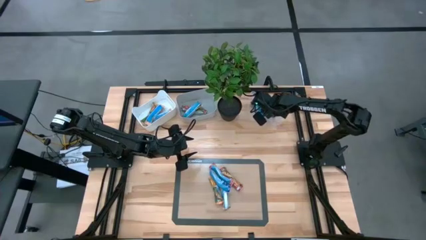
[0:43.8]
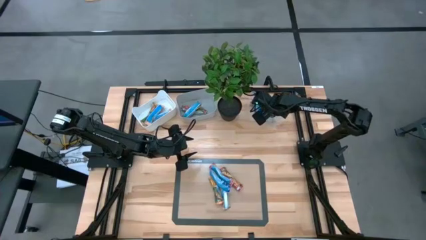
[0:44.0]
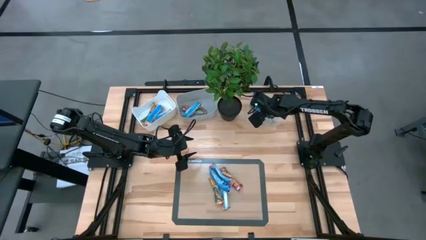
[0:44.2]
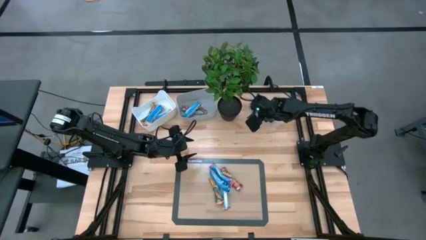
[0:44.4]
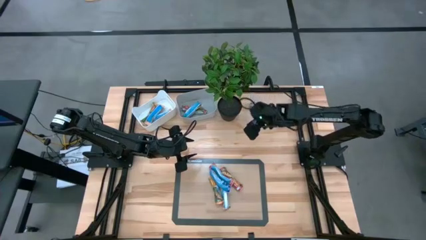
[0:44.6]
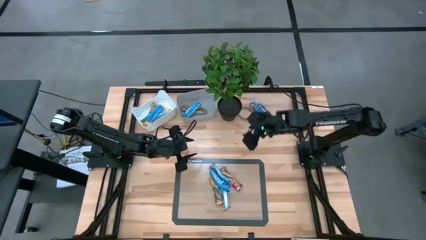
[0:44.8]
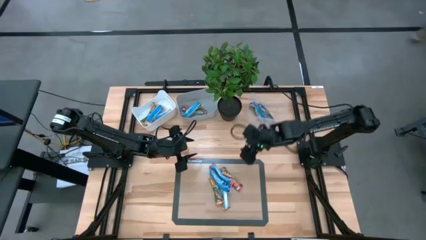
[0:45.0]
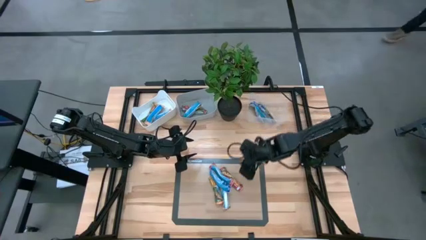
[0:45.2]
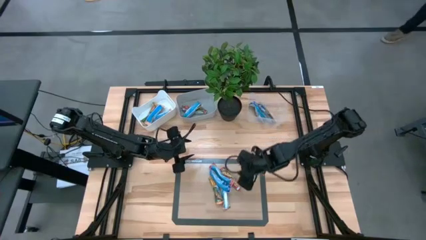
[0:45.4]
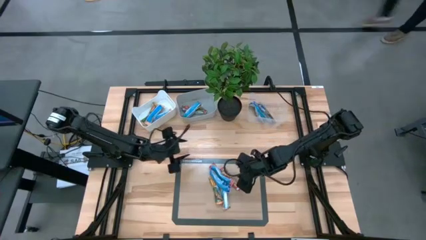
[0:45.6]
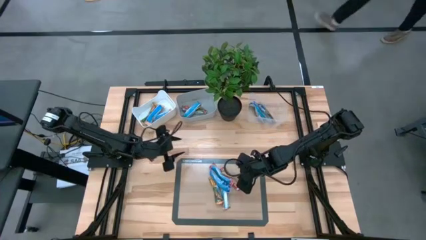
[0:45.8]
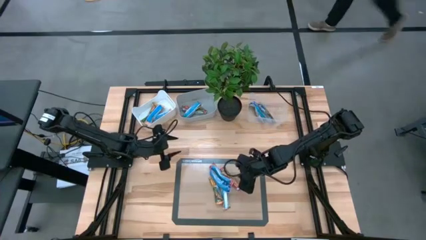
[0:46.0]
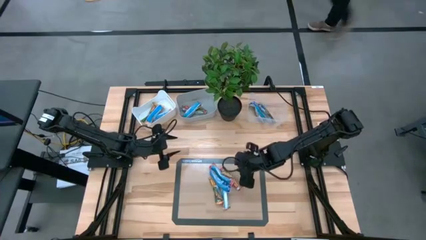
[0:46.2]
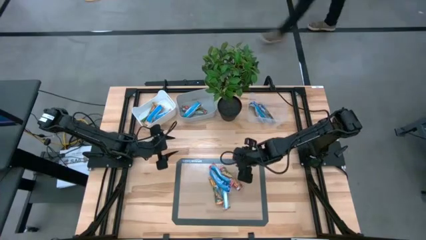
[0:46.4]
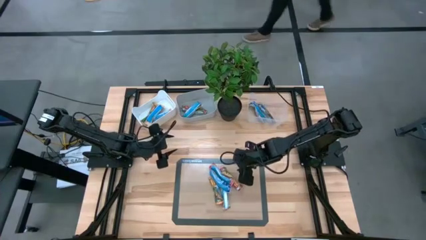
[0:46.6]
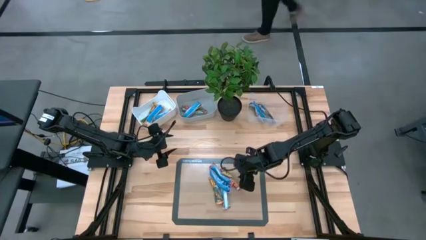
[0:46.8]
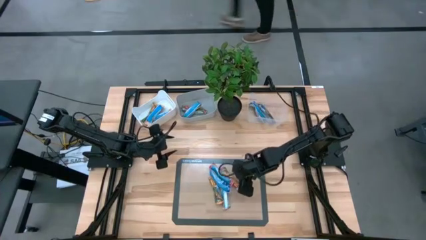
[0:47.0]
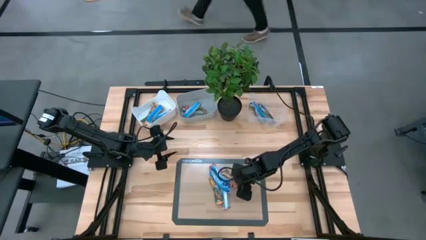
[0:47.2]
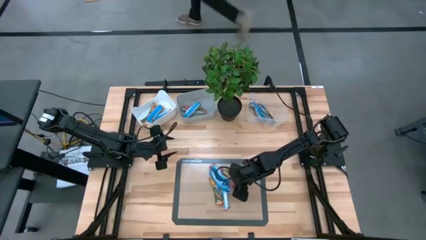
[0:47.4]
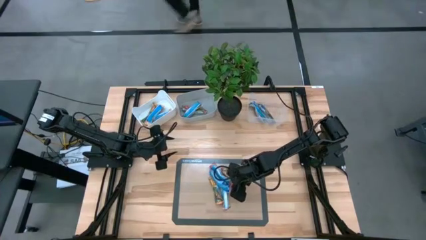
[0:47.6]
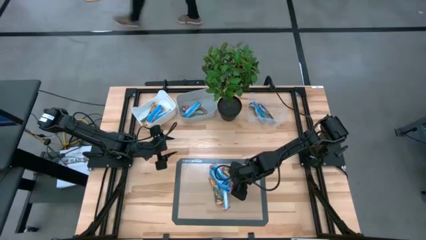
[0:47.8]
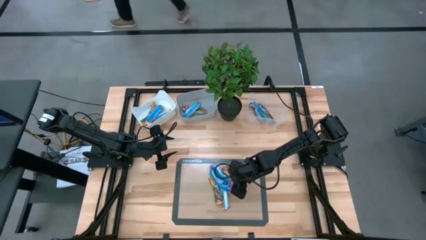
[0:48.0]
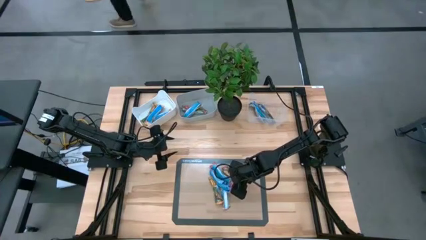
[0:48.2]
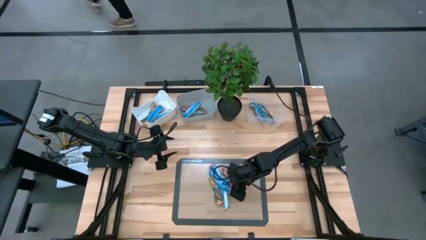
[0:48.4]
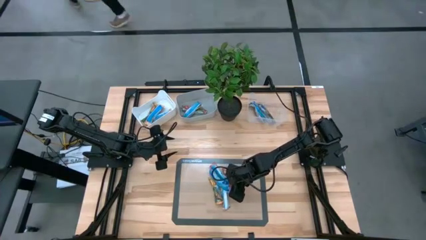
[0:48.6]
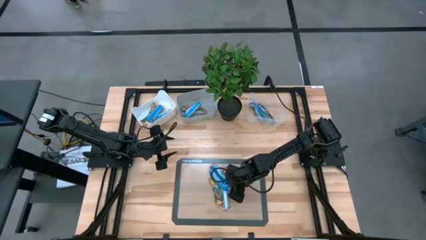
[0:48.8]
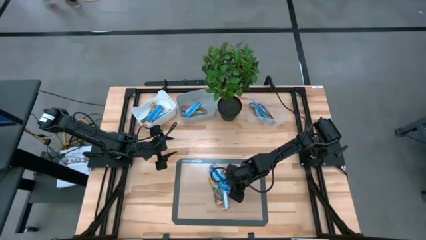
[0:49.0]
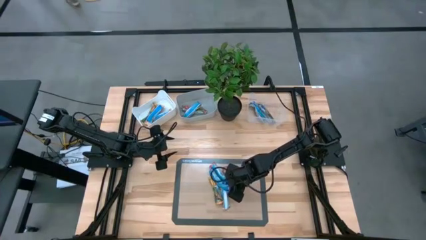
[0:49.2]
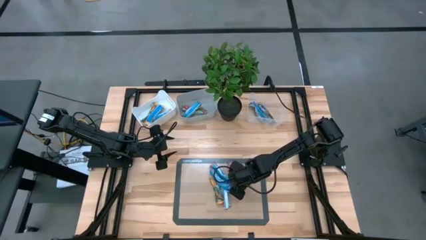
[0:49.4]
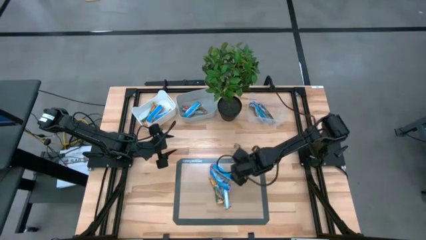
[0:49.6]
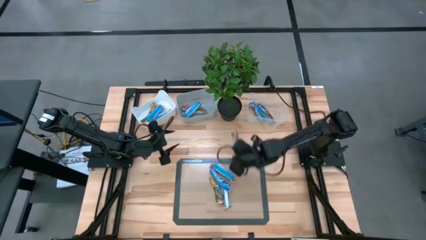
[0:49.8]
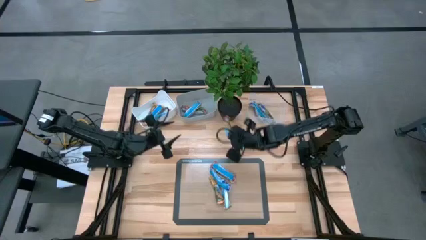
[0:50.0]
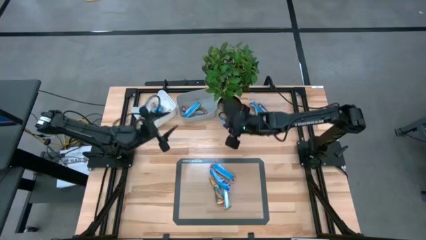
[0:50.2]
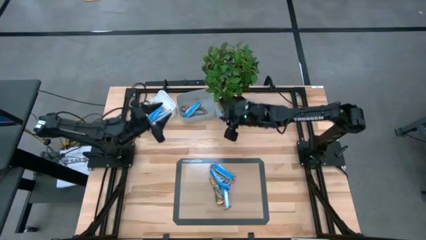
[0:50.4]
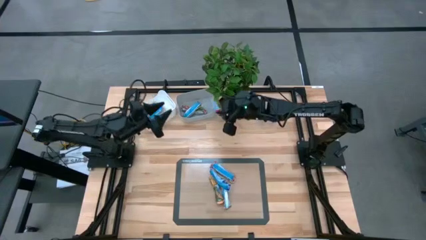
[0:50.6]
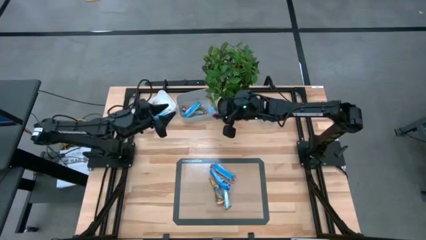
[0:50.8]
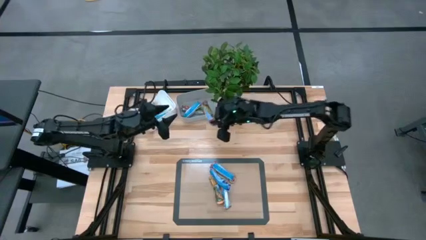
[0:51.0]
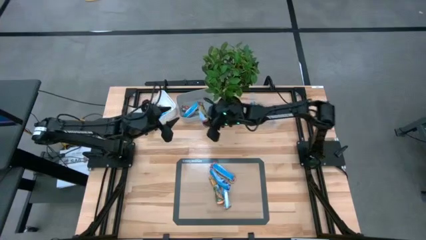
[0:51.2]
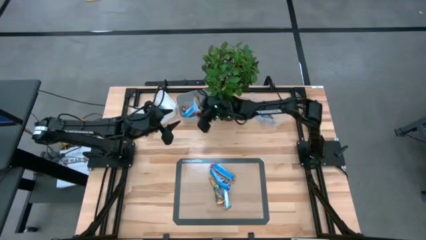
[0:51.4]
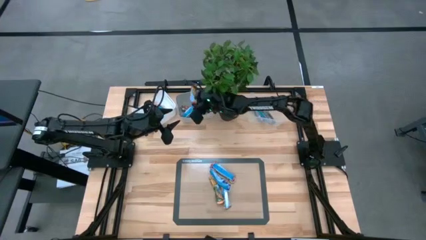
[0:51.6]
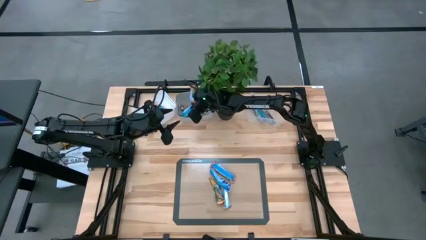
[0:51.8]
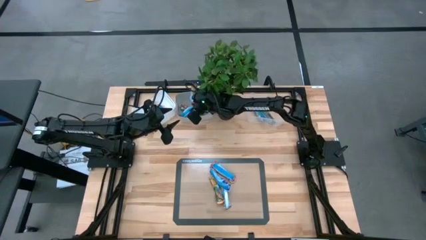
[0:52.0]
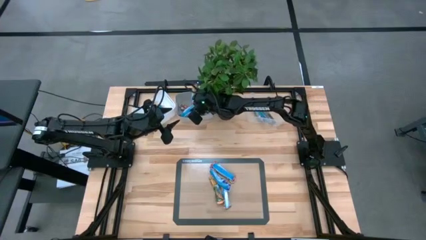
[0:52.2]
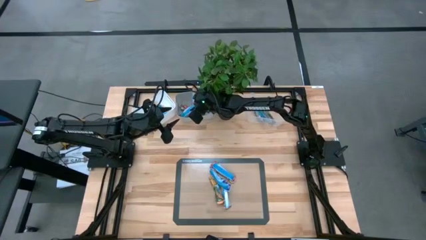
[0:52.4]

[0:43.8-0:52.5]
Task: Pick and place Granola Bars by type
Put the red granola bar into the gray bin

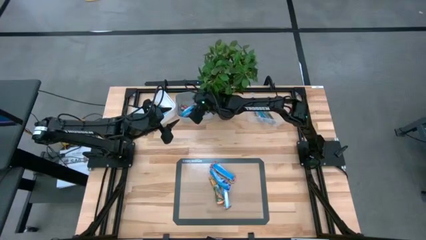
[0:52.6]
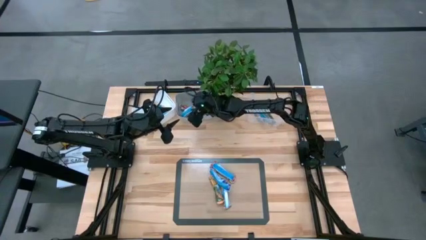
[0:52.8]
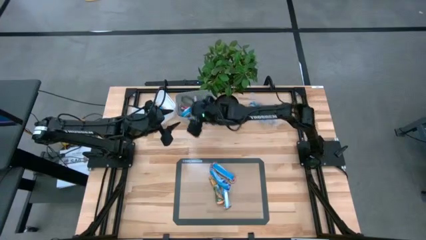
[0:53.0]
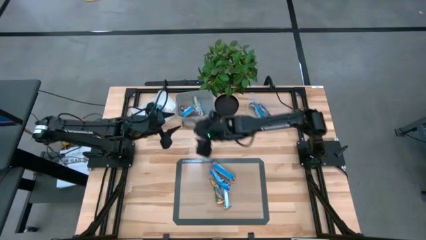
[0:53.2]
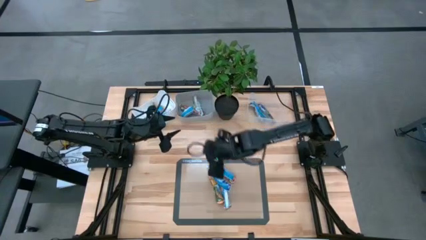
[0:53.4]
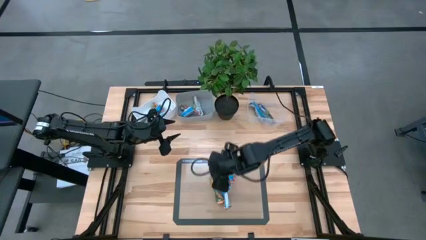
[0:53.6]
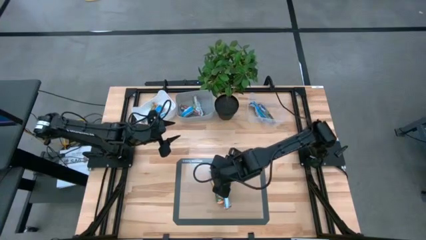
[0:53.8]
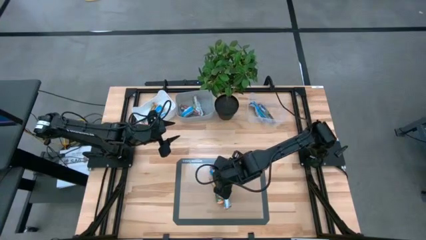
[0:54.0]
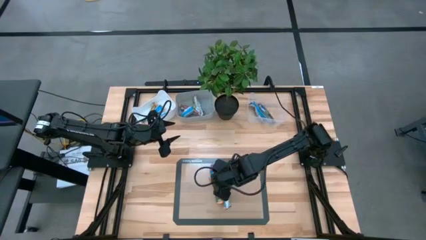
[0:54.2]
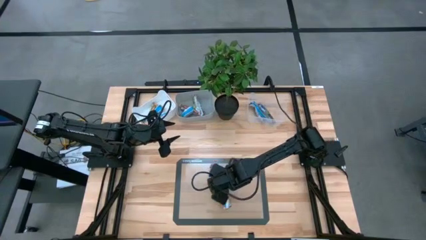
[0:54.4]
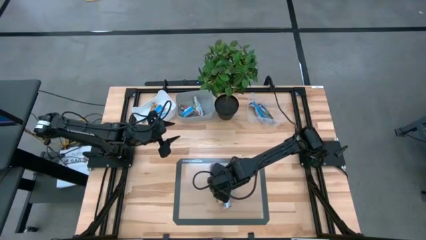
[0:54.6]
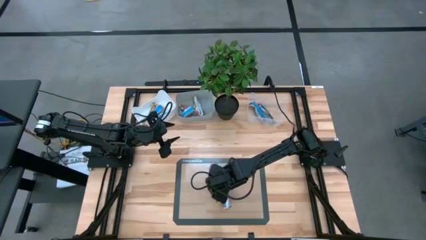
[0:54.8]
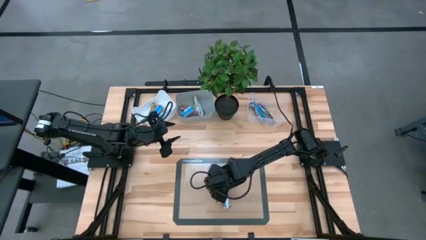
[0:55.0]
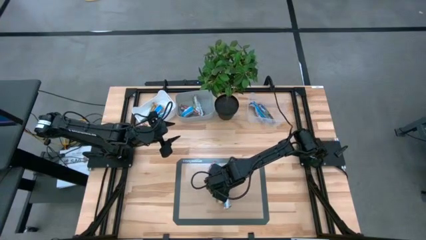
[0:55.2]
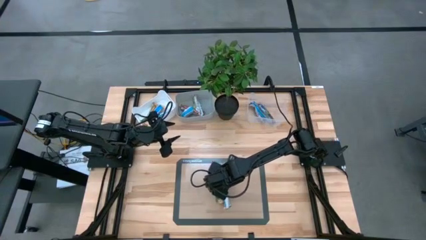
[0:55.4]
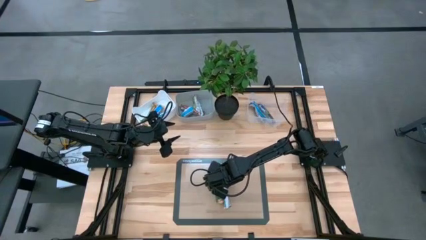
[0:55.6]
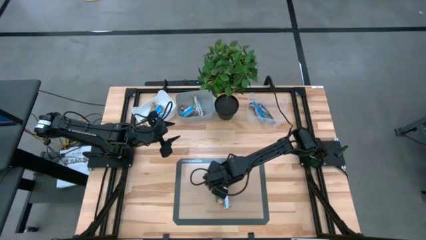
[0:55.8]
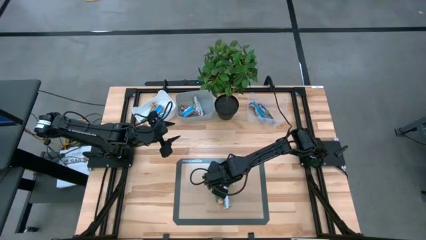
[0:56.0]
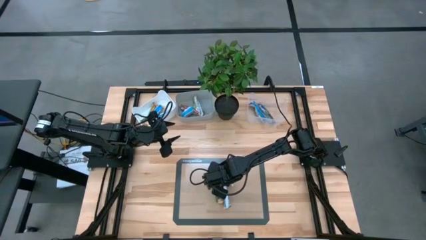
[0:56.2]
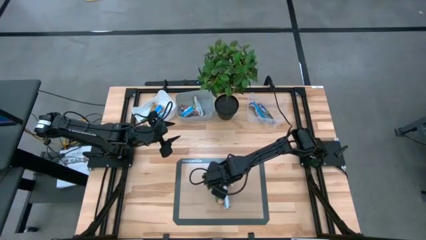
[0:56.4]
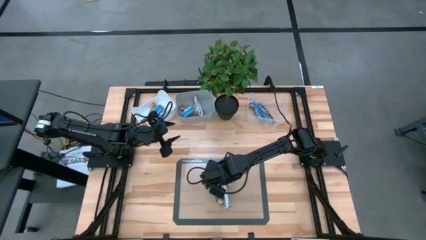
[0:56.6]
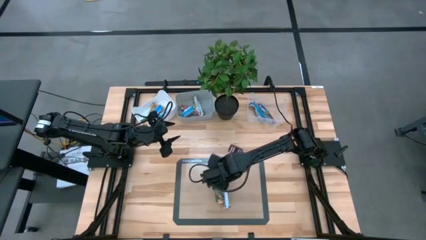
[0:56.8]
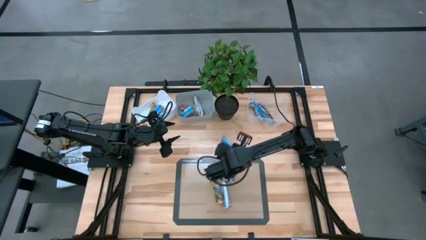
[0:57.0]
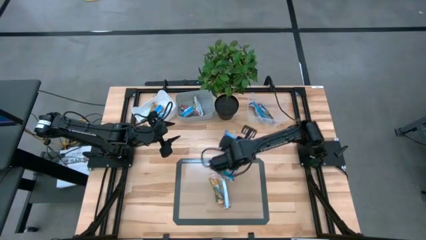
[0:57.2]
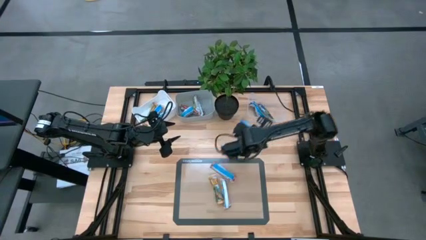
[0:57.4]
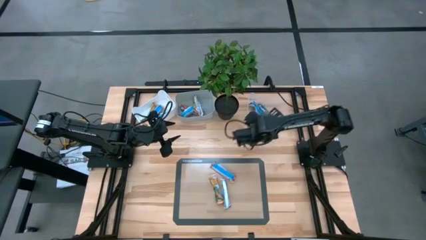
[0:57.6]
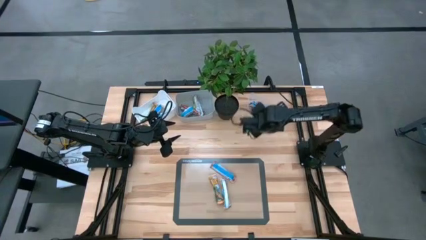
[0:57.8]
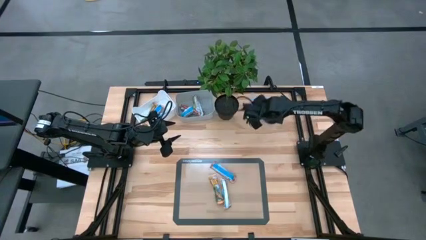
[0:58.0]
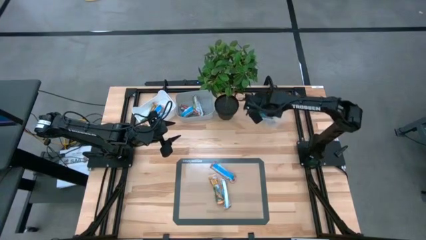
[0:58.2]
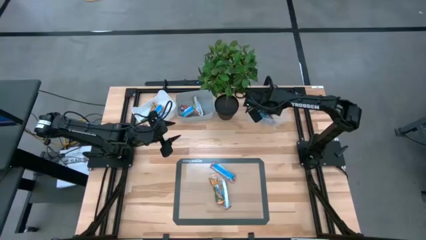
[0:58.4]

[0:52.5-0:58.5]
Put the blue granola bar into the transparent bin

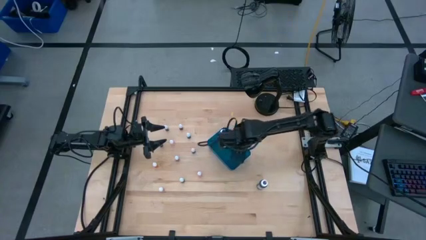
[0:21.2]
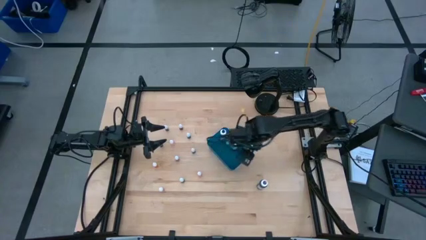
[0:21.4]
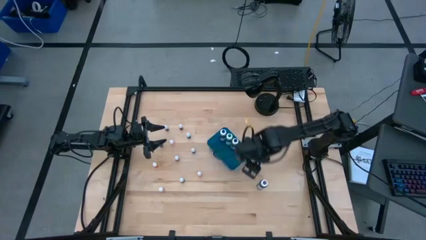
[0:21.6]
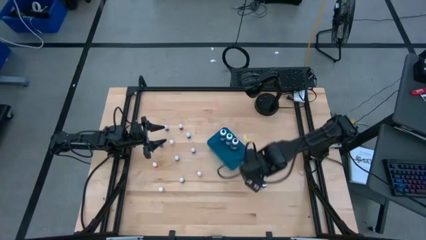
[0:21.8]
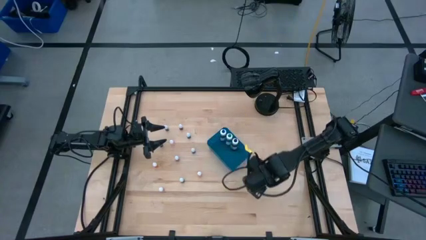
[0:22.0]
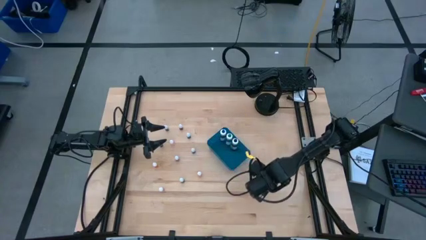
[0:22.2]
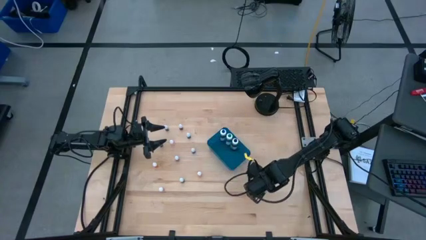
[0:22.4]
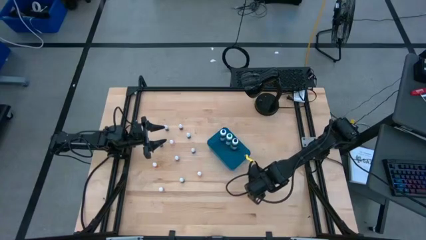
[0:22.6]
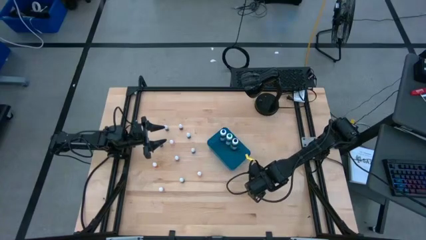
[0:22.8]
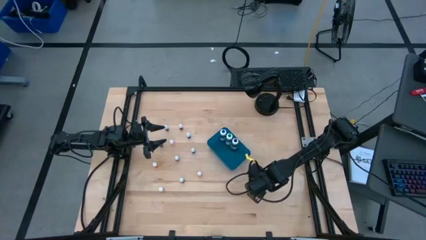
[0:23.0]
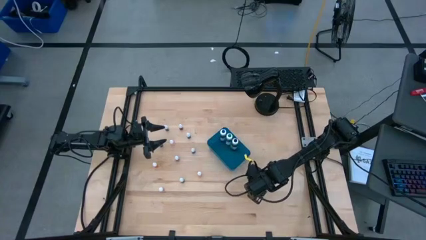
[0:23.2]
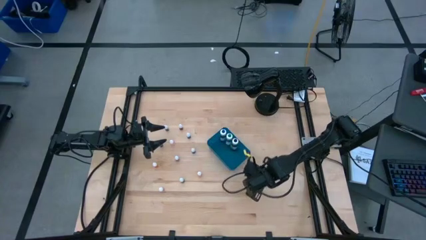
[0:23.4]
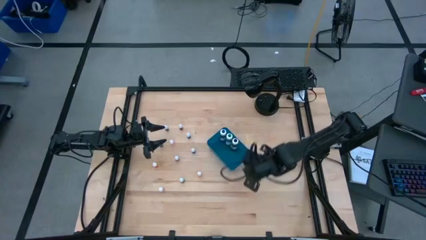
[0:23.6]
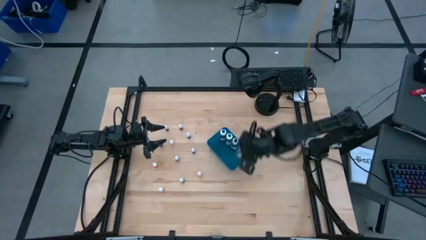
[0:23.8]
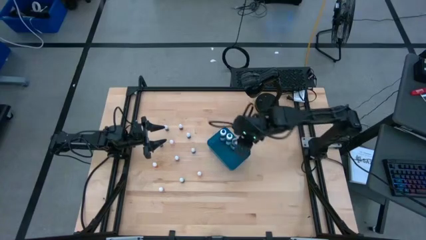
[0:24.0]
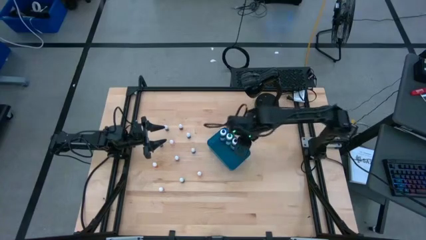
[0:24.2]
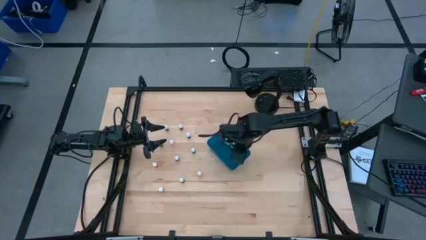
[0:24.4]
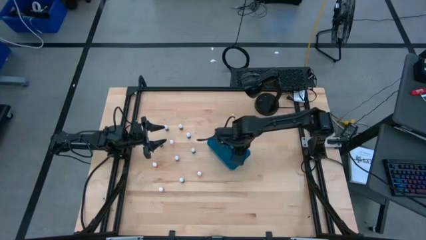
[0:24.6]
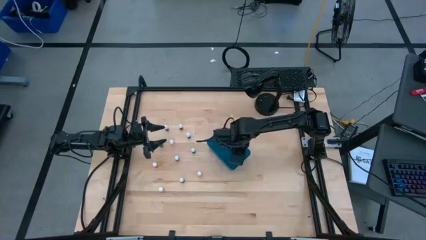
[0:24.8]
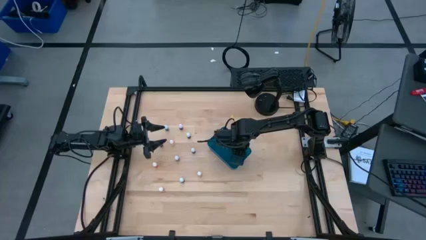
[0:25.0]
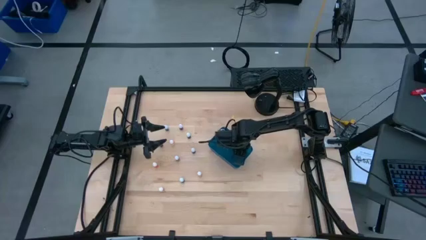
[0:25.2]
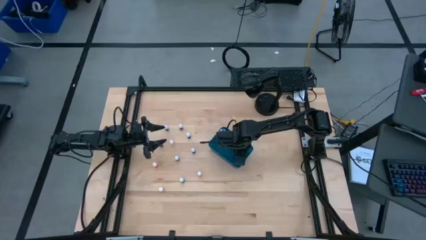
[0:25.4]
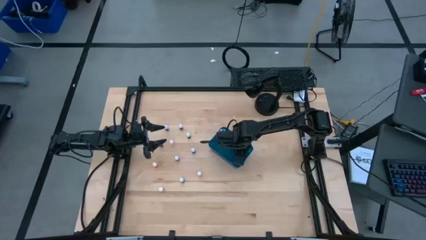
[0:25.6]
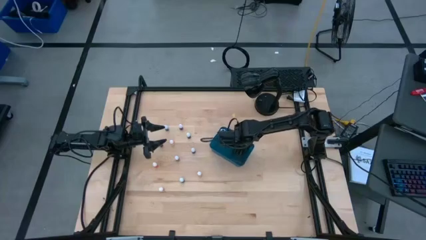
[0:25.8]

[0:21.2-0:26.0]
Task: Pick & Place food coloring
Put the large purple food coloring bottle into the blue container
